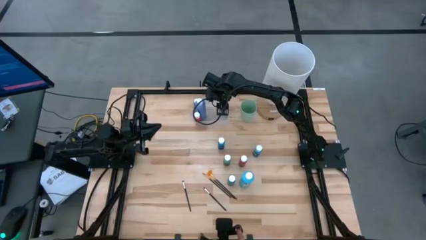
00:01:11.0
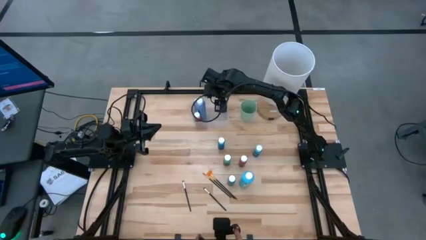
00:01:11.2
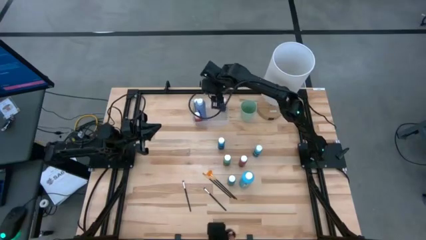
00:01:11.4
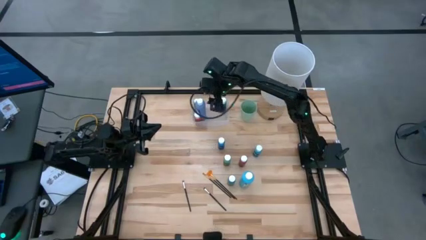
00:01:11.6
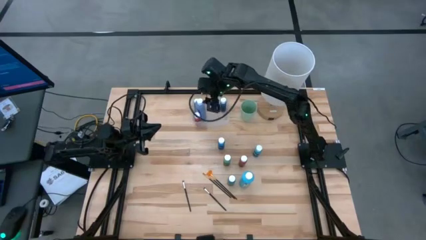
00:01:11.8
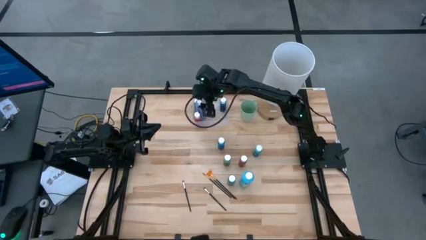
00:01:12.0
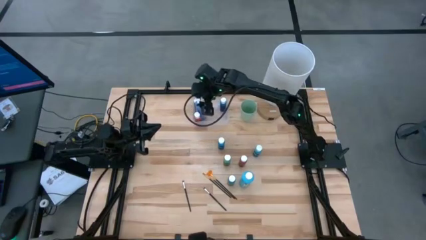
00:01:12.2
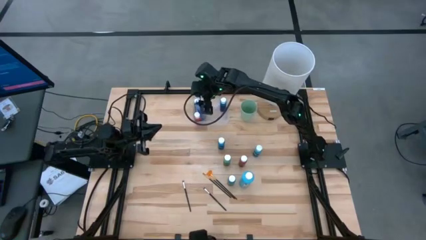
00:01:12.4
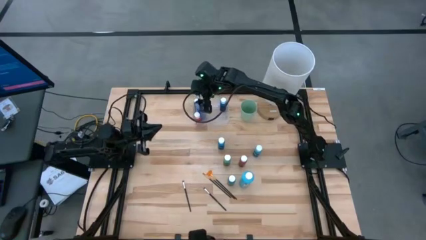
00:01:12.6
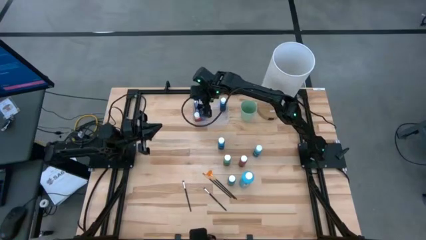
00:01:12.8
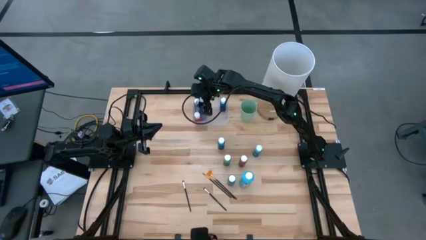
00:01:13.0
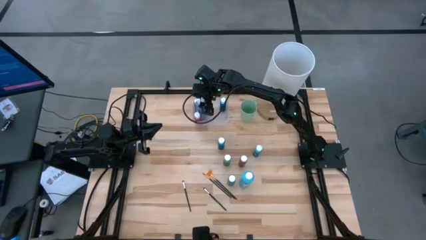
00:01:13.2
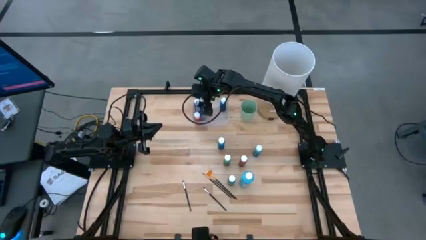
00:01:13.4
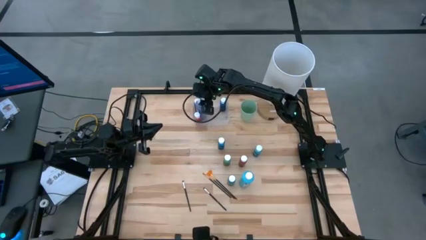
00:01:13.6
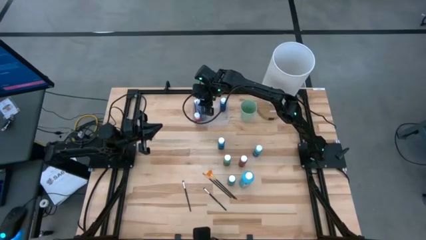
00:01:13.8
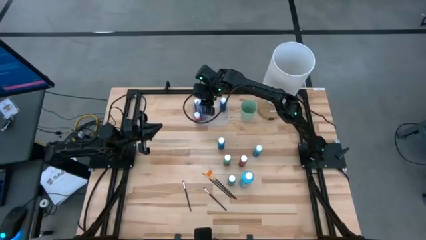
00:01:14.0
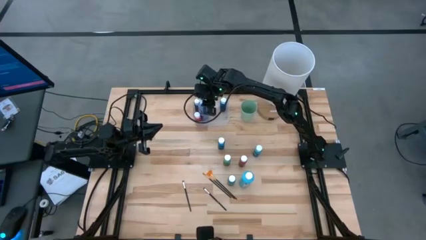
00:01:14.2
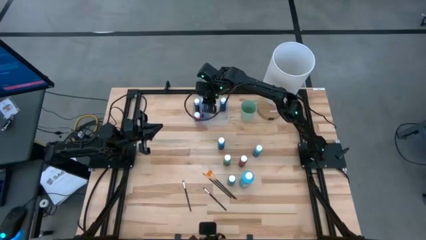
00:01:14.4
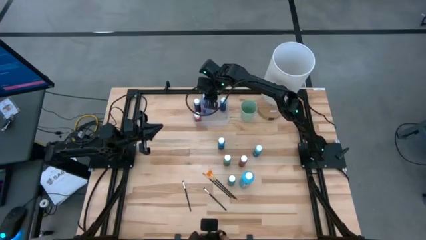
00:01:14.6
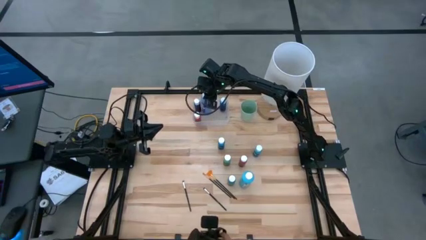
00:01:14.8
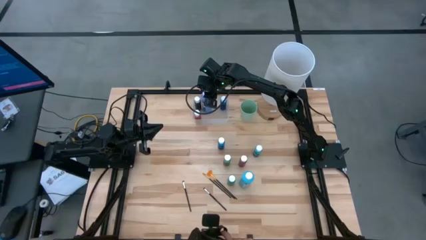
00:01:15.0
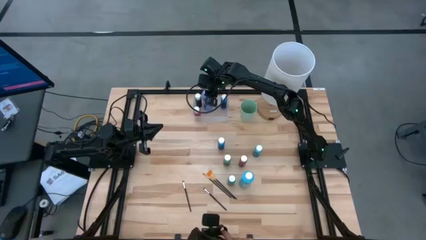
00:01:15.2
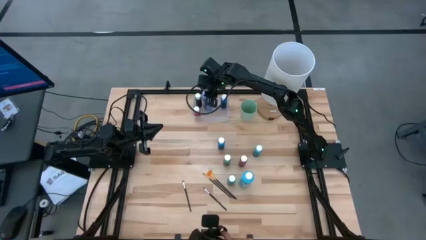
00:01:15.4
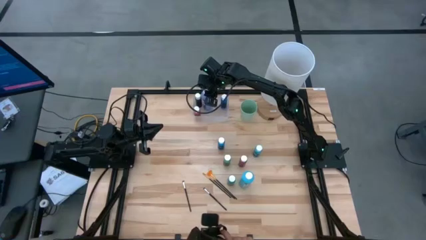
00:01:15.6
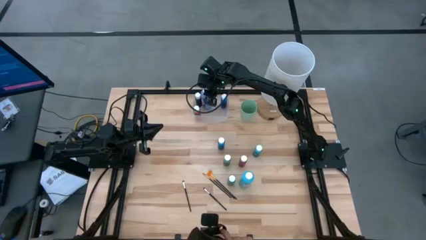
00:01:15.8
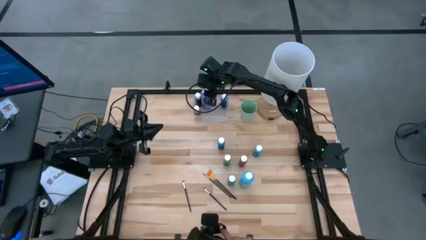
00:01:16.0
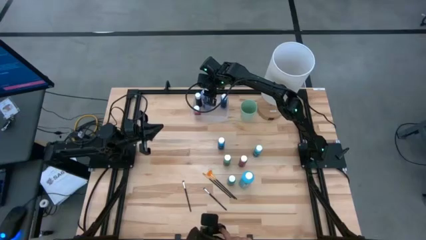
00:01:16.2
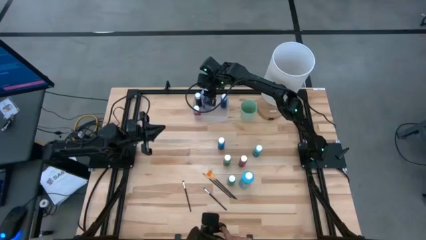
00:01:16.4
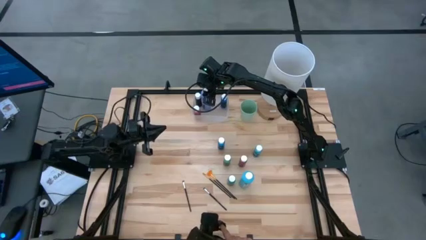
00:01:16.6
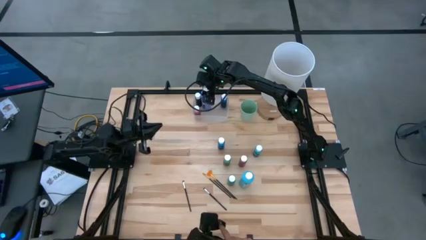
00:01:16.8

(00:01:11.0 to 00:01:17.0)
Task: Pick & Place Paint Supplies
Adjust the large blue paint bottle into the transparent bin

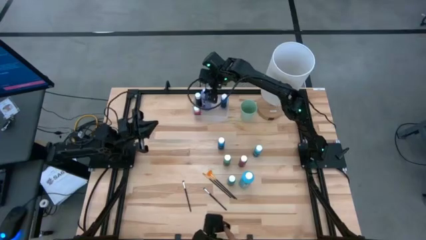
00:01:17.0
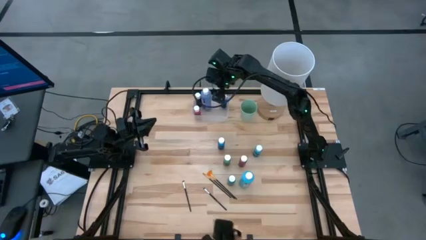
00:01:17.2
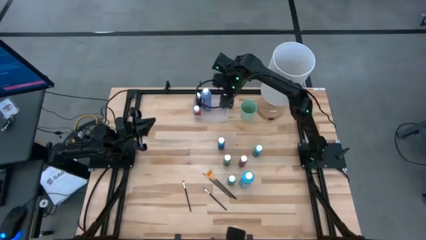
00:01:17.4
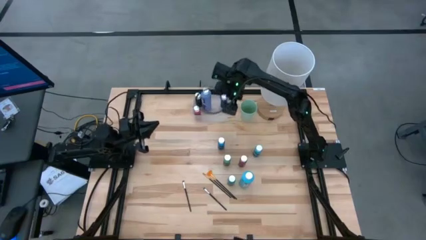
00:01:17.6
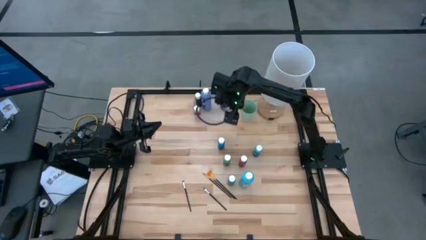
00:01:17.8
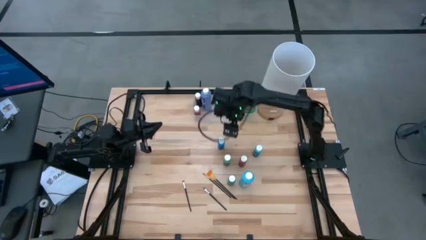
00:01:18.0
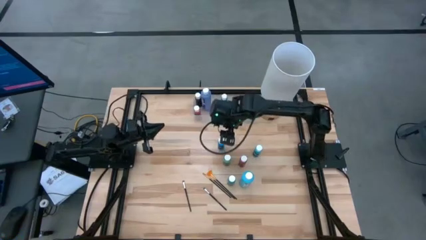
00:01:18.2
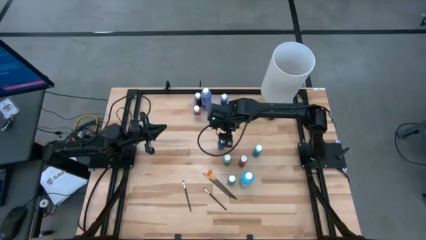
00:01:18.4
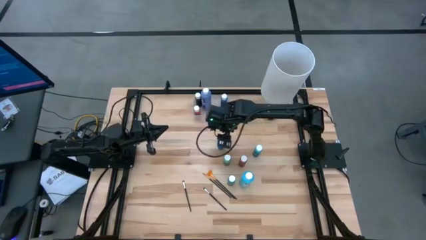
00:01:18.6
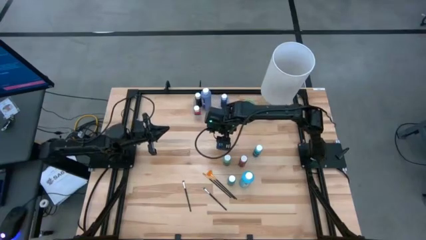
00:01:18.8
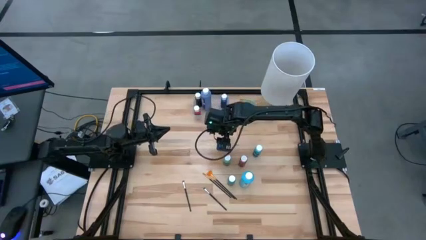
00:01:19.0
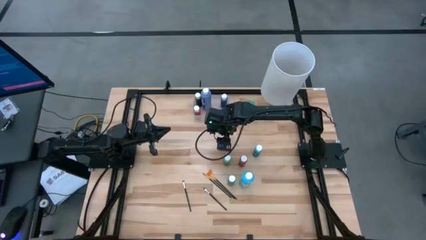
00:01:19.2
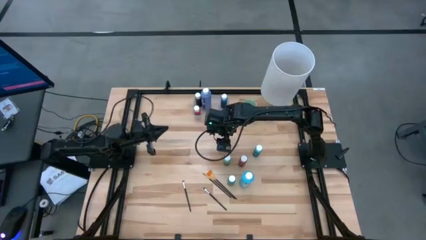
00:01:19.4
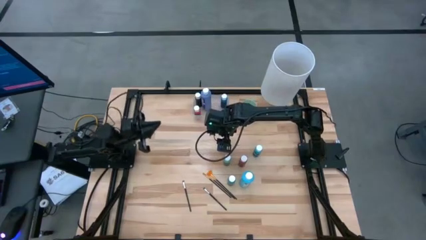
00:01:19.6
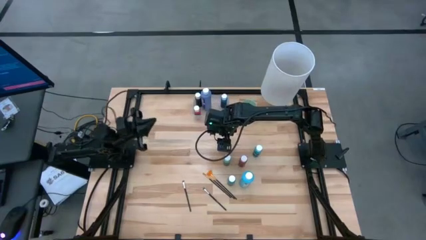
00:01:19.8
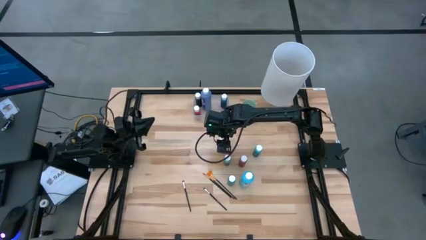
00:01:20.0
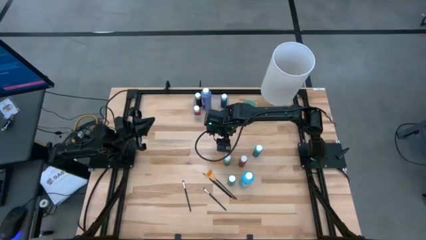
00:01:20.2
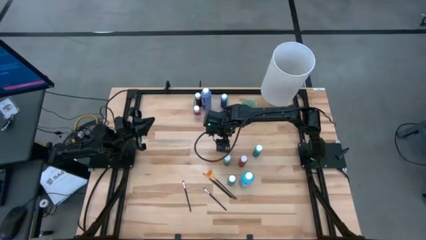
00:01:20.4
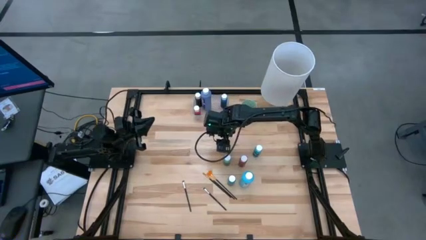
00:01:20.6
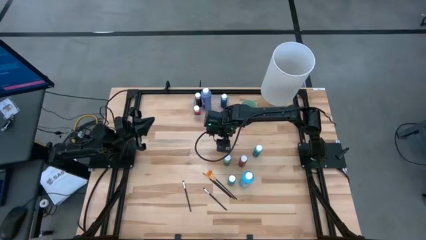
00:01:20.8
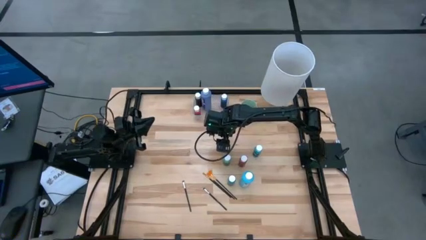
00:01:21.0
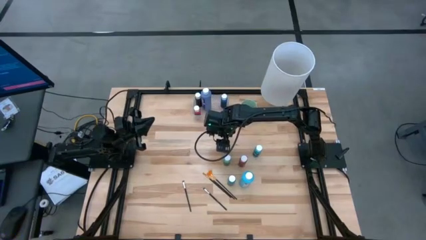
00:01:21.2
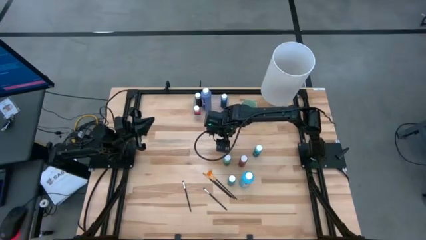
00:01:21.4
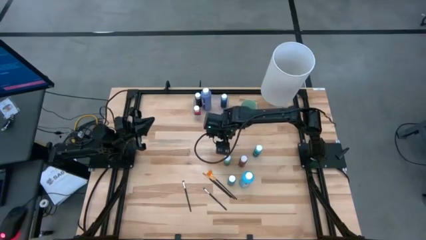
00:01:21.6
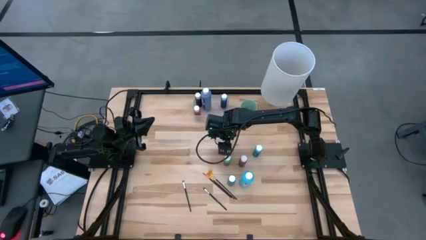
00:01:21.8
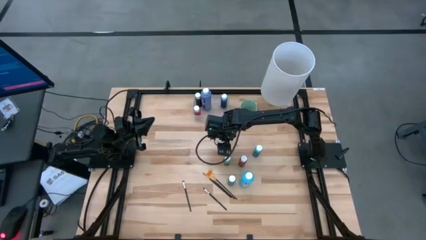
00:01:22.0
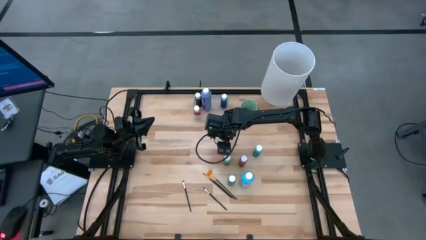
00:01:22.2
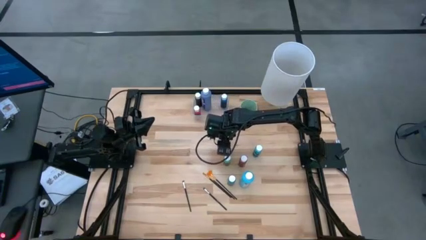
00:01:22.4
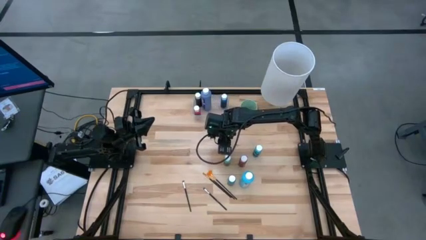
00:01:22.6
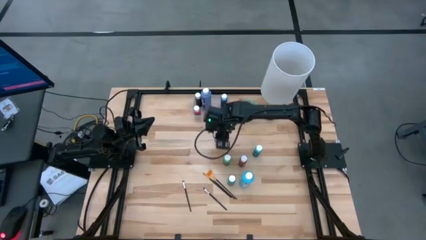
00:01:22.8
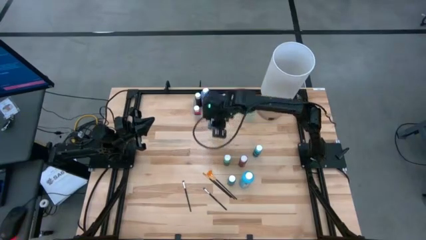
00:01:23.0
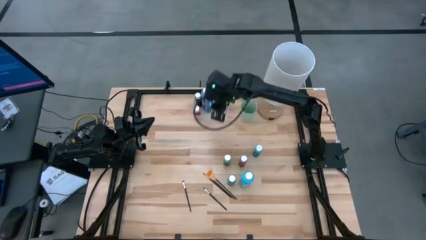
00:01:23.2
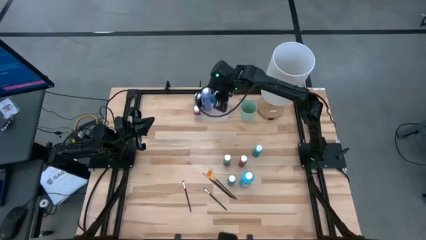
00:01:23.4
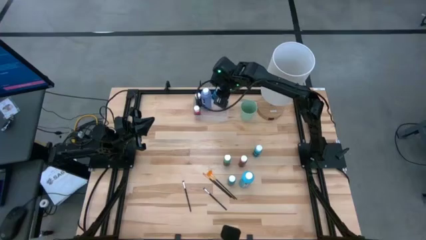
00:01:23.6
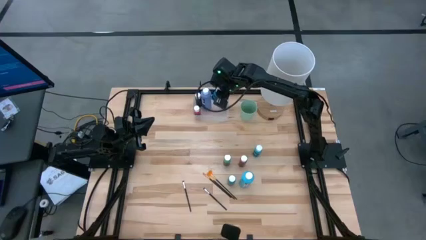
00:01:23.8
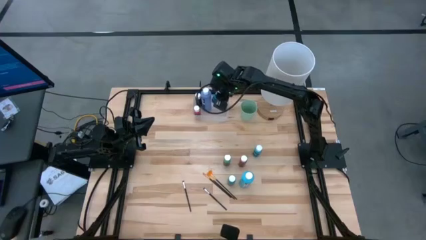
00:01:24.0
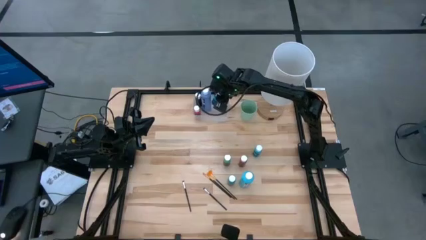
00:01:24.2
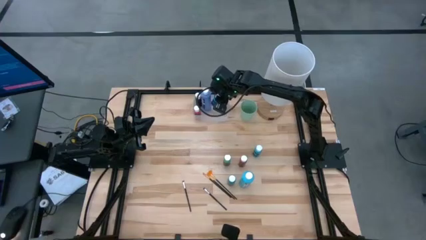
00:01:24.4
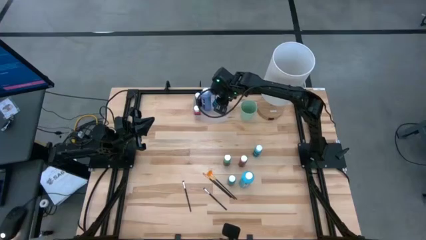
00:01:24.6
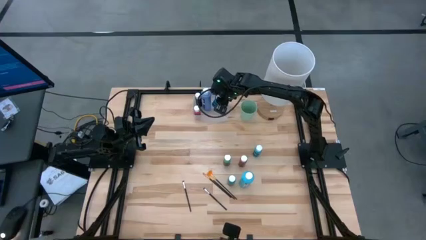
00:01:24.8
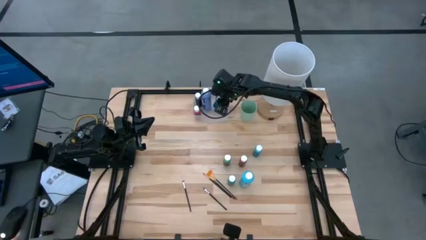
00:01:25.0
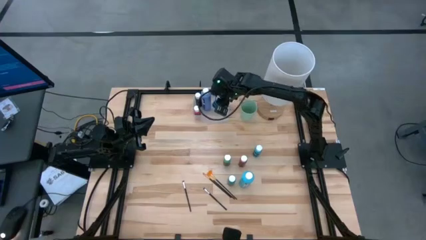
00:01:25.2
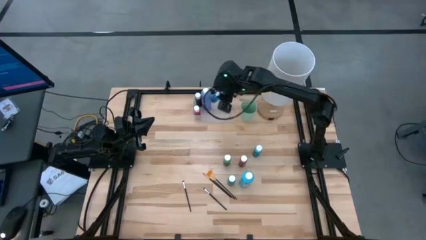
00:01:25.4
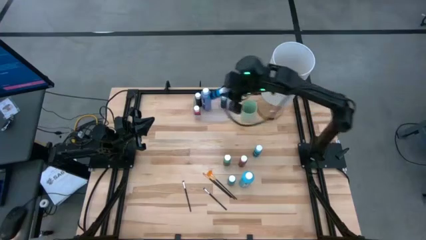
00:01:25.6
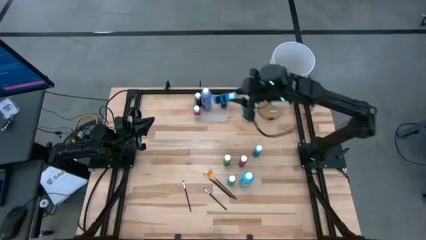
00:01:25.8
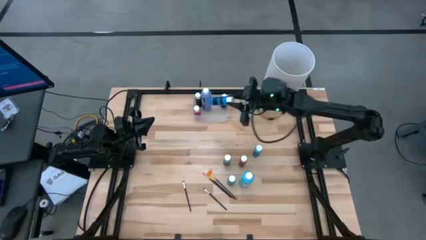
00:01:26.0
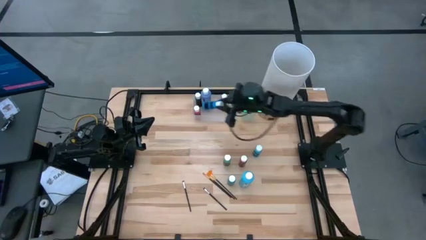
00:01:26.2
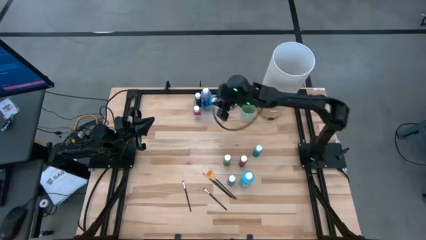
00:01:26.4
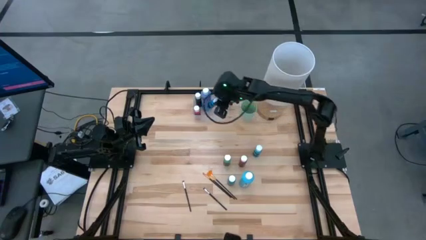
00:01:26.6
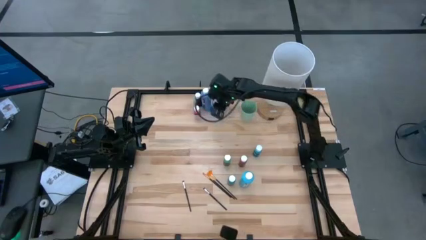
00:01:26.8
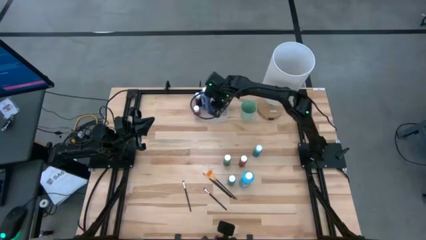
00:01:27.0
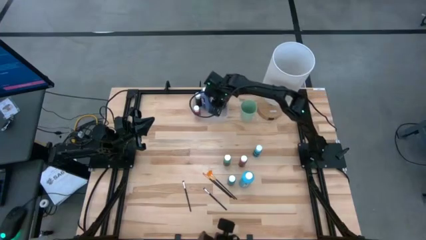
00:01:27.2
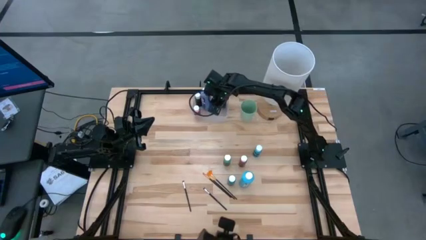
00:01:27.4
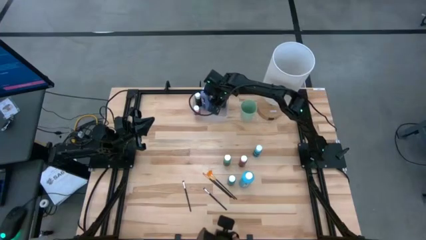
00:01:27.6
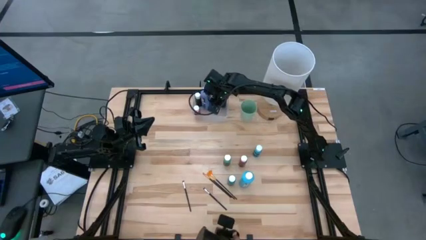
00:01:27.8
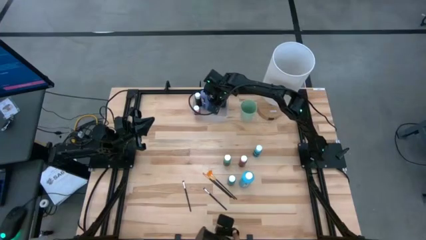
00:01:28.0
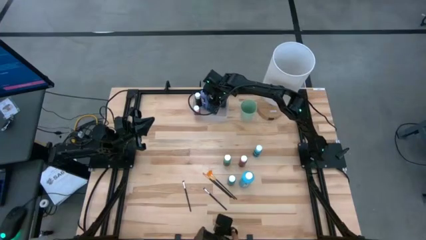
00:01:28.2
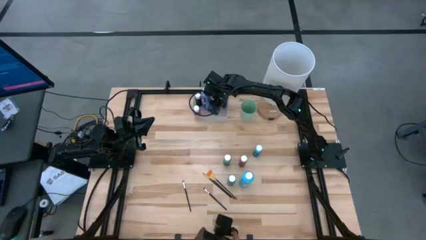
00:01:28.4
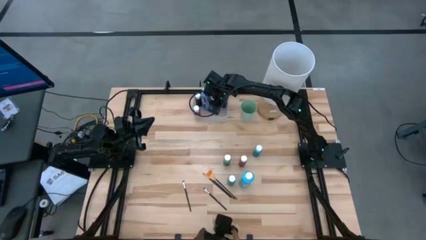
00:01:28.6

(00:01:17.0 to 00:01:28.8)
Put the small blue paint bottle into the transparent bin
